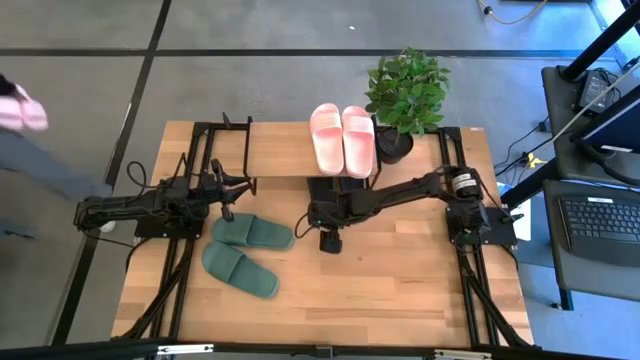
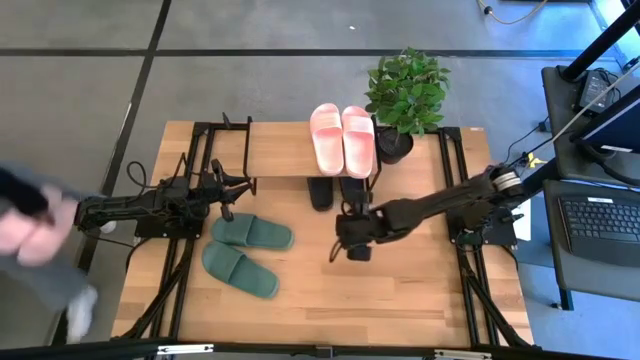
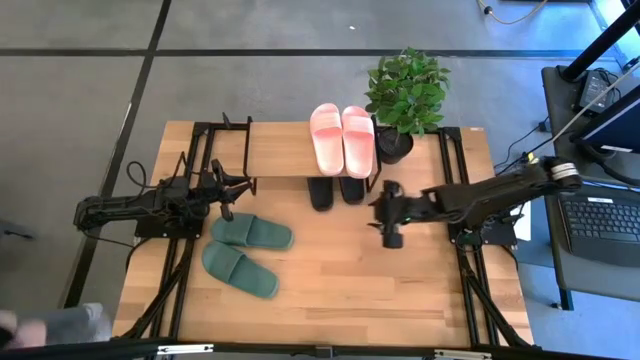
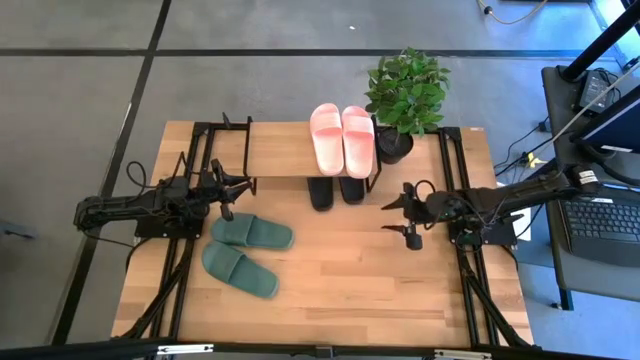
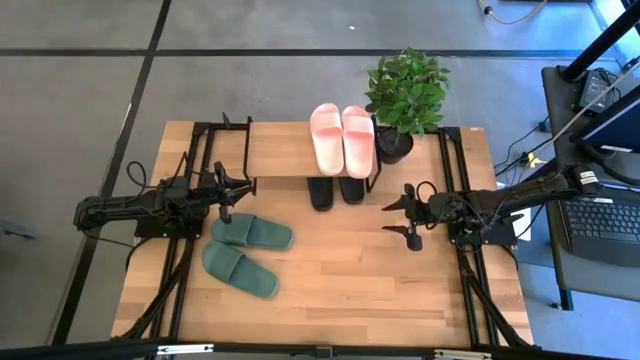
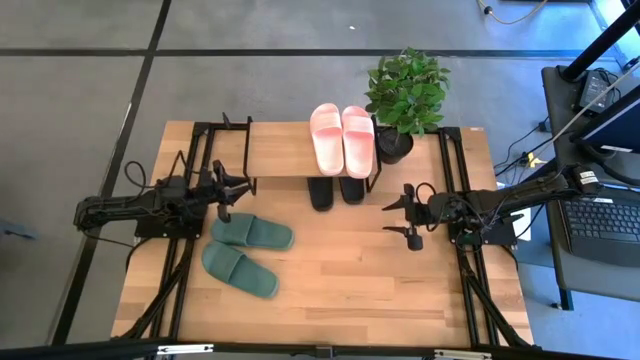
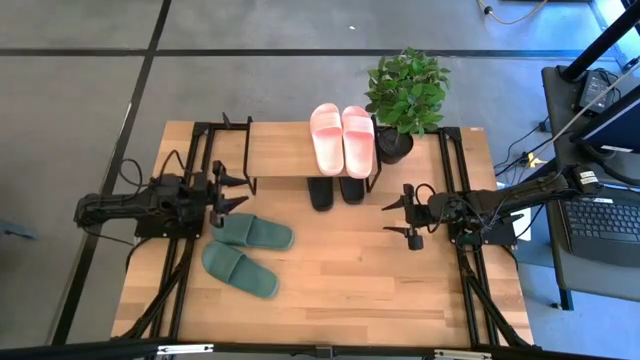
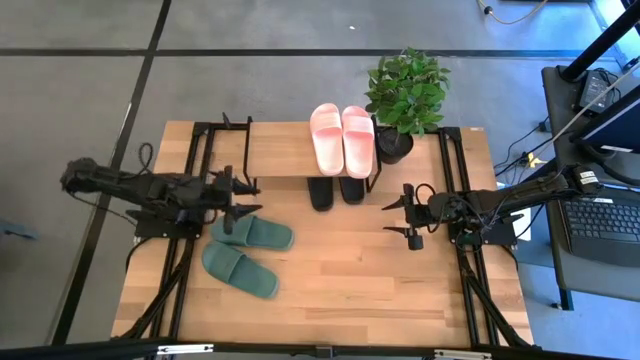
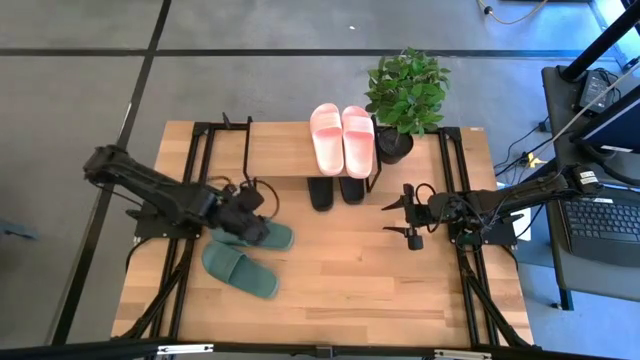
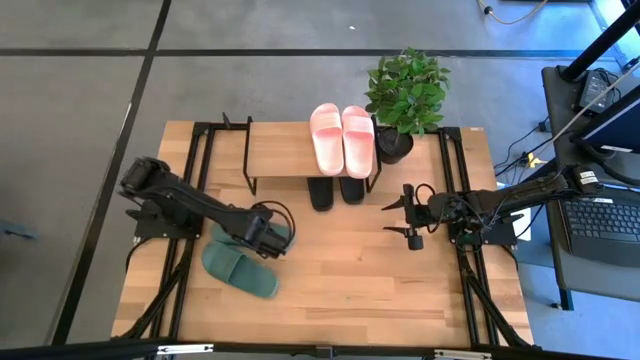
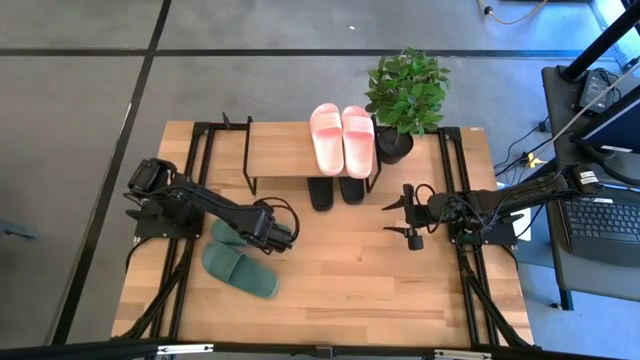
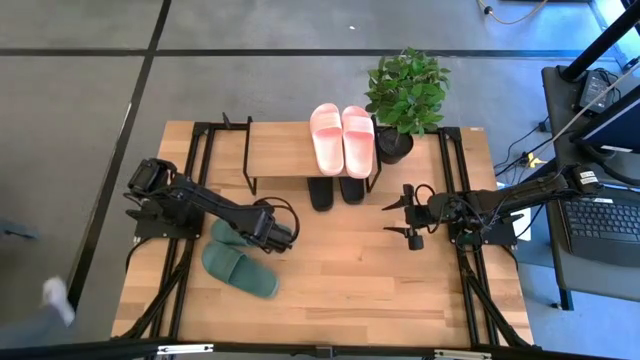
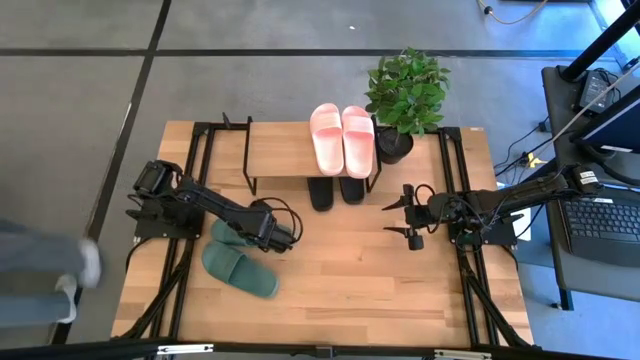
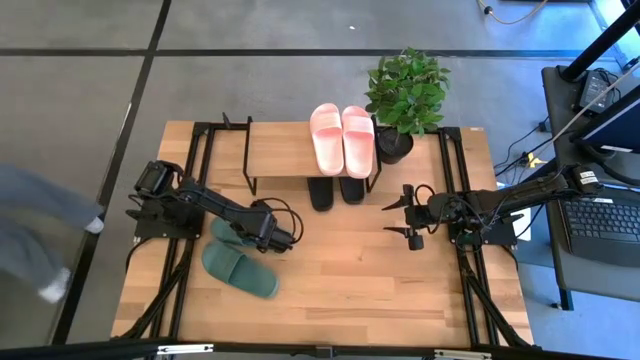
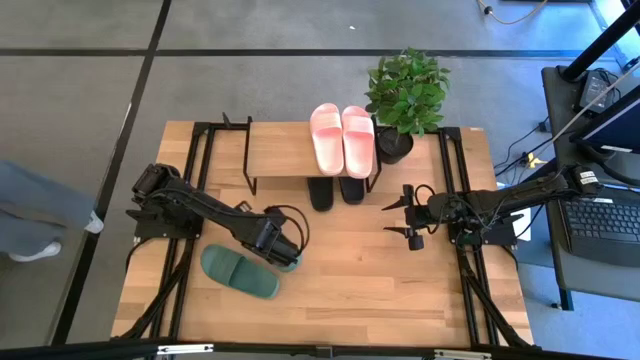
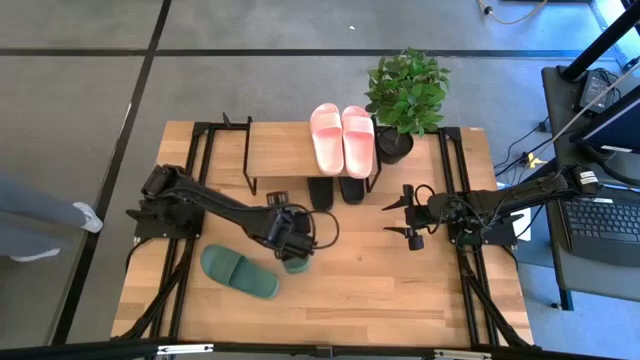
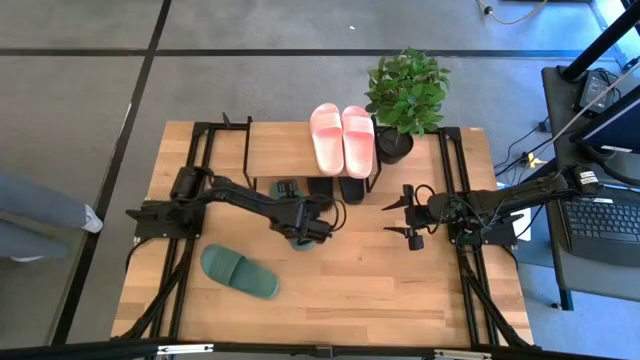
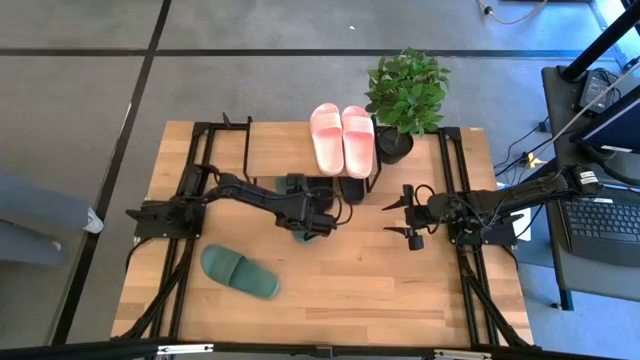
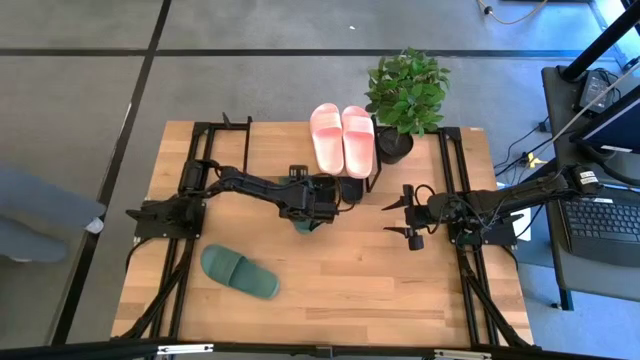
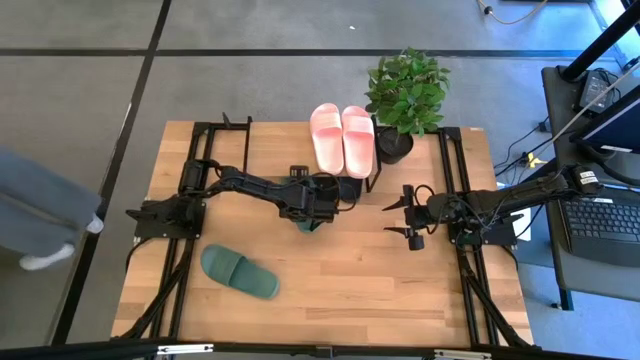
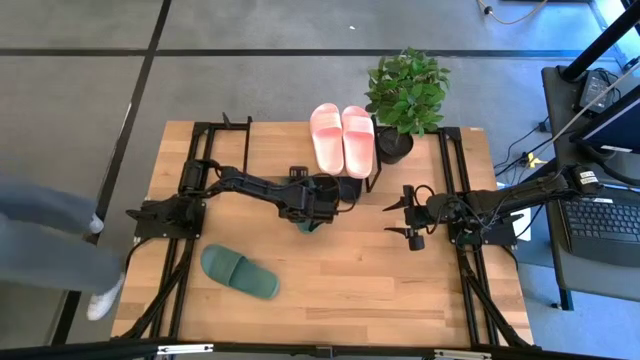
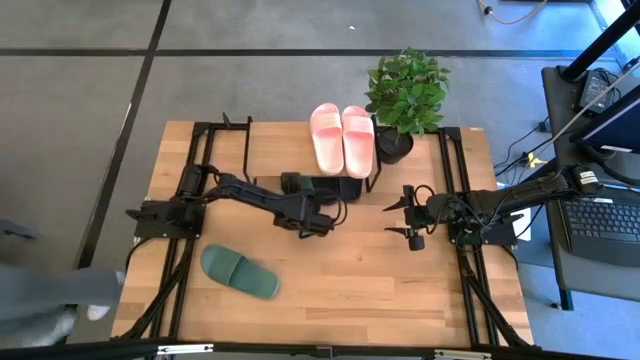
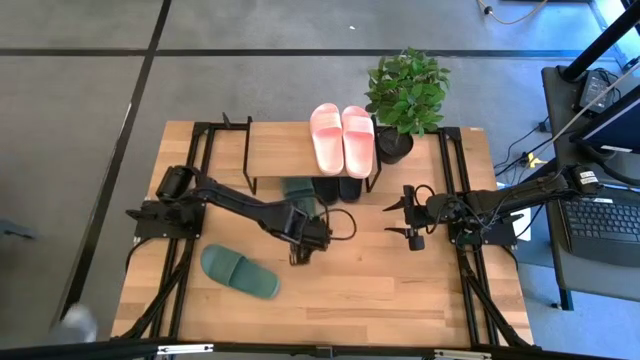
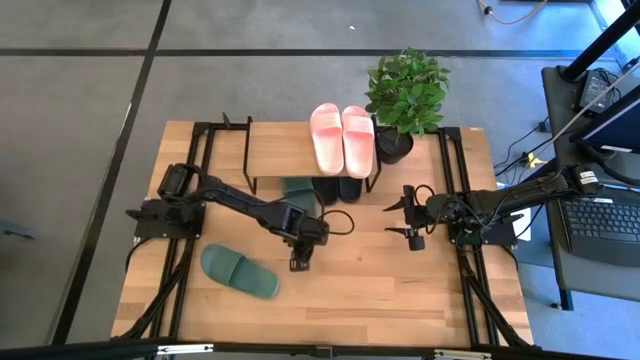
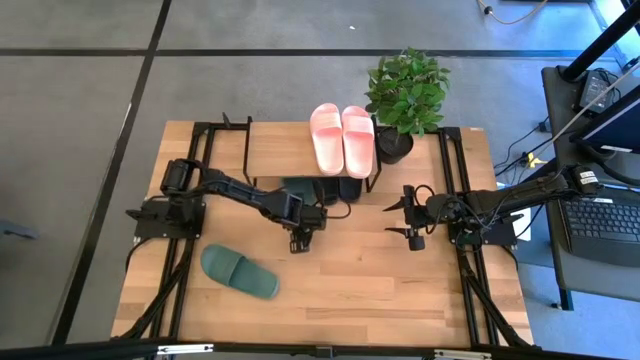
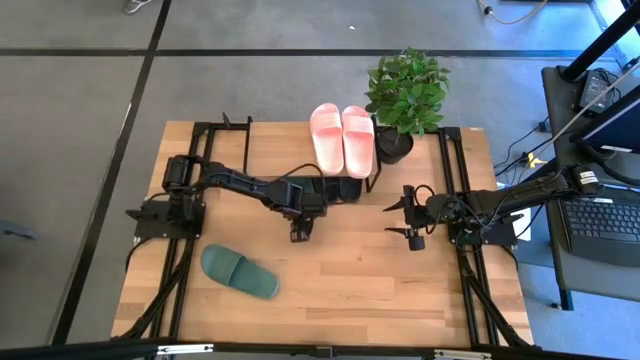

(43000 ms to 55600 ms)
Task: Pick and place slides into the shelf
Put the top green slide under the shelf

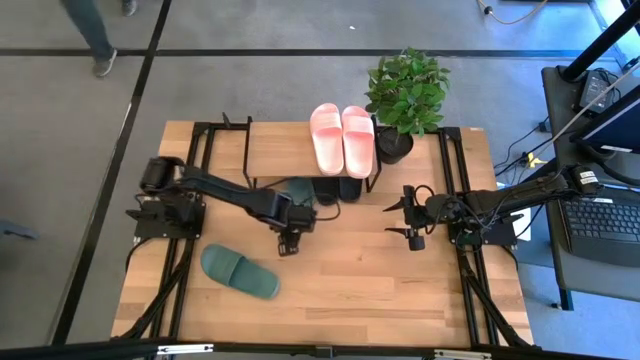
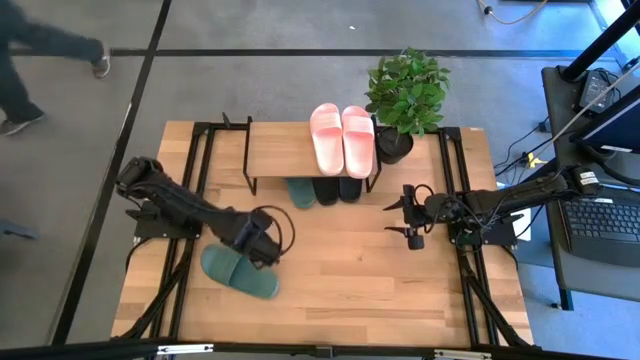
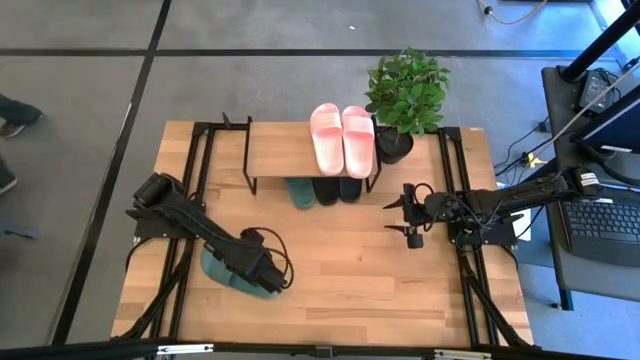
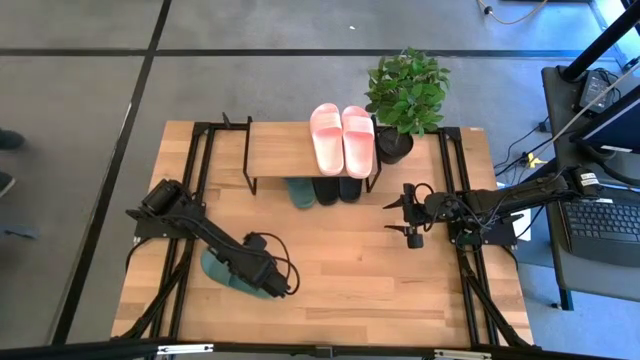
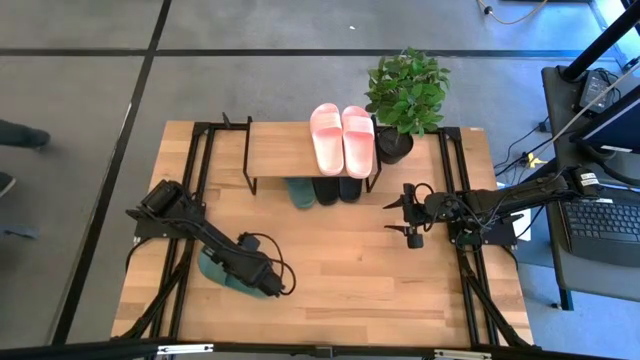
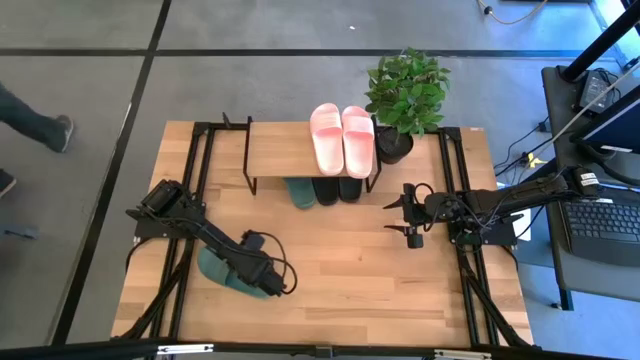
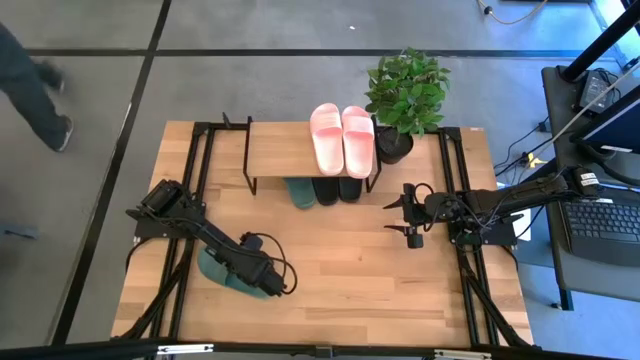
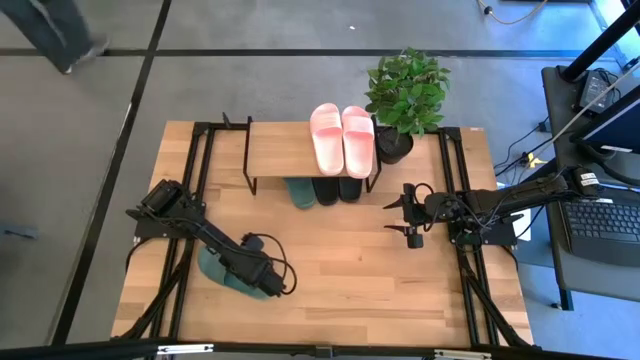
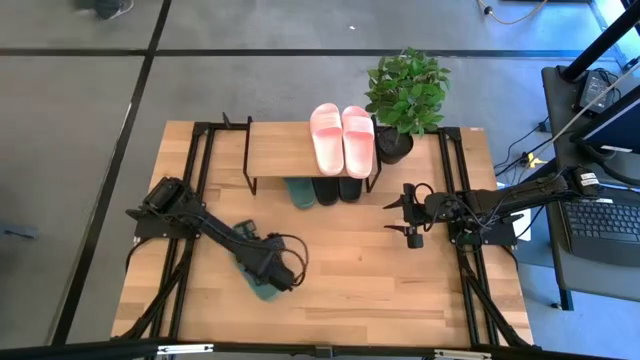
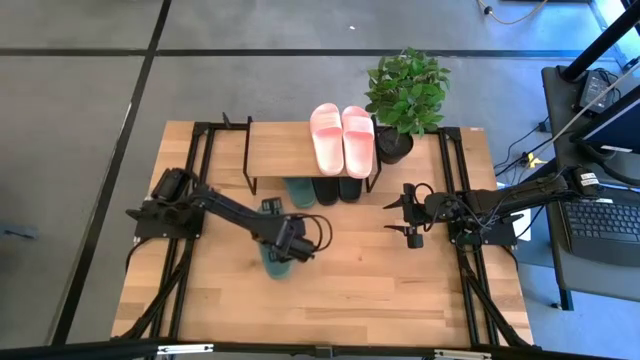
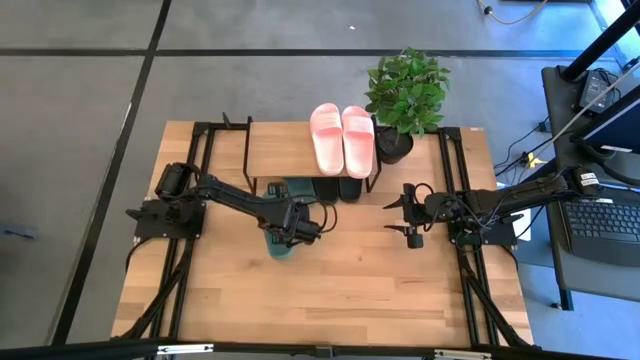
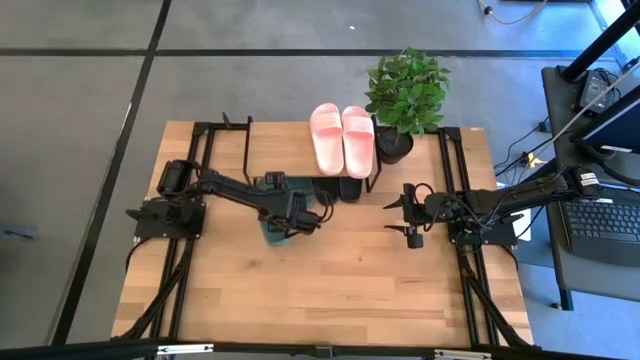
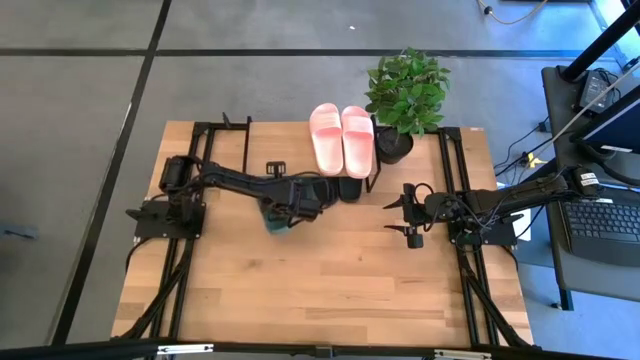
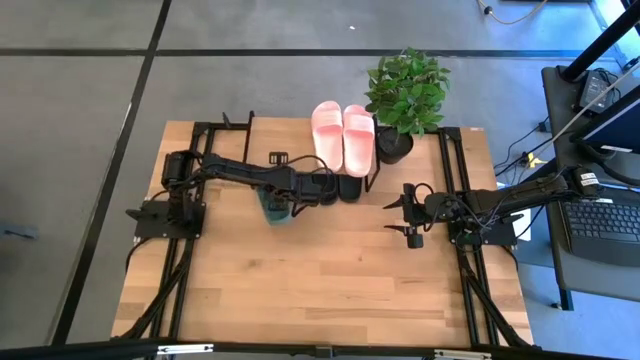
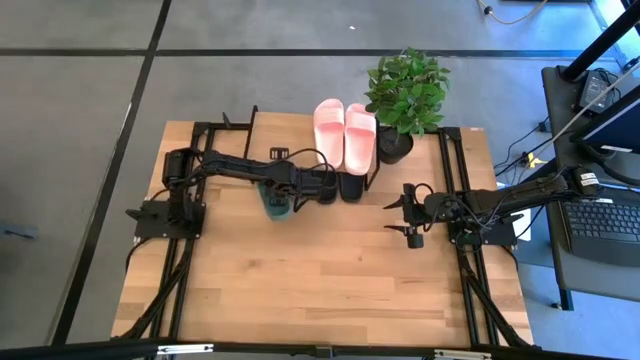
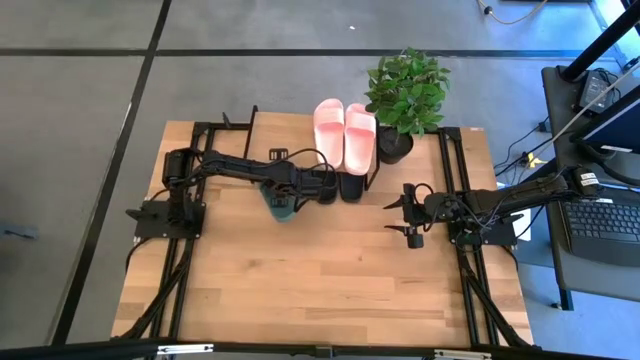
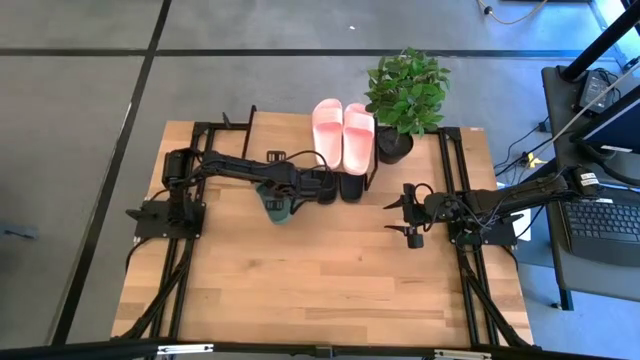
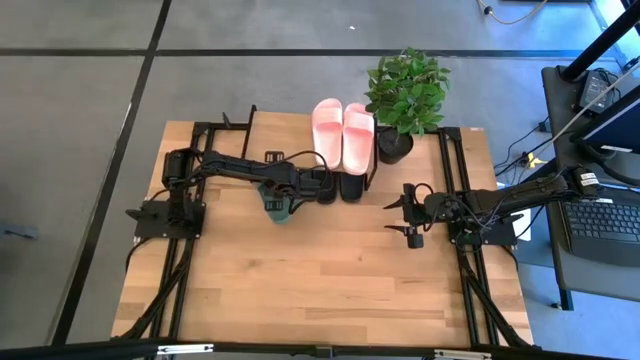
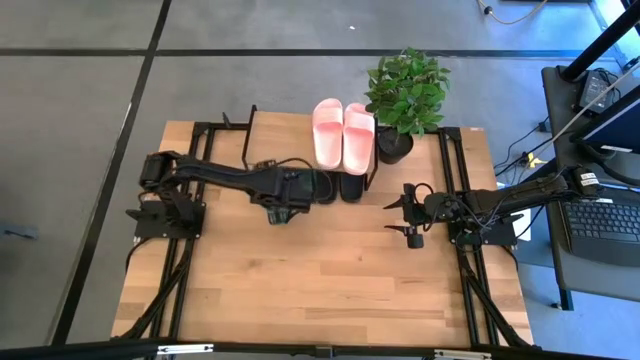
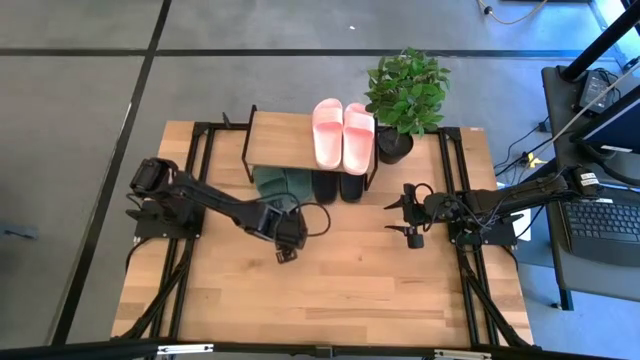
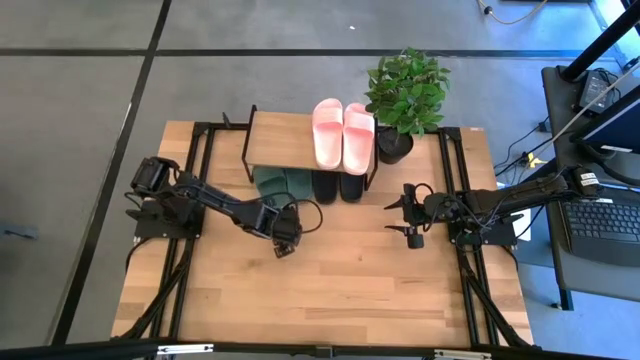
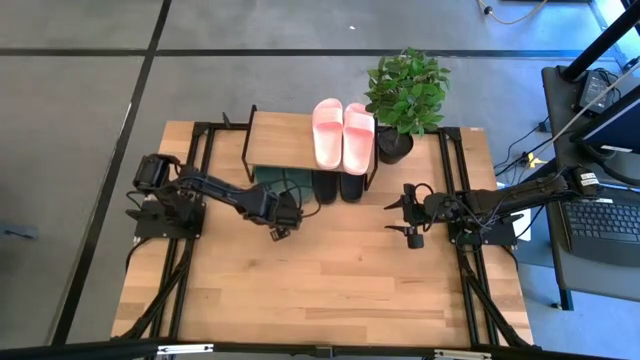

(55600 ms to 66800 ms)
Put the green slide under the shelf
